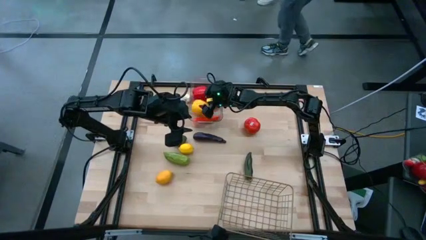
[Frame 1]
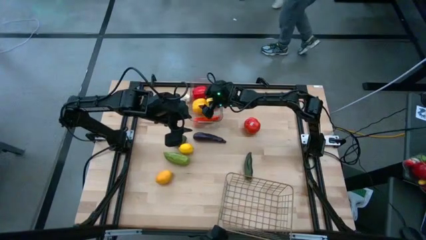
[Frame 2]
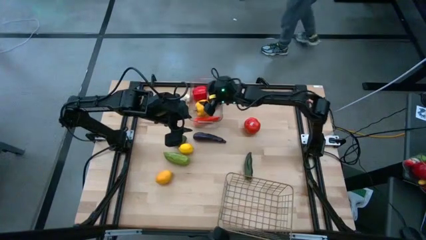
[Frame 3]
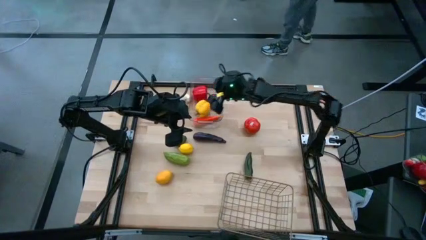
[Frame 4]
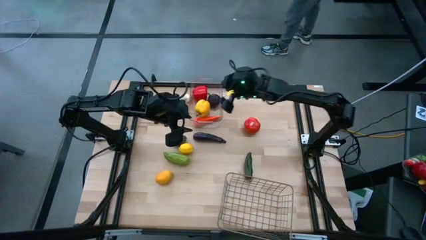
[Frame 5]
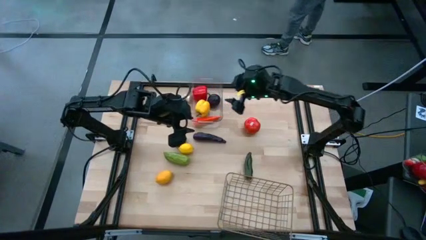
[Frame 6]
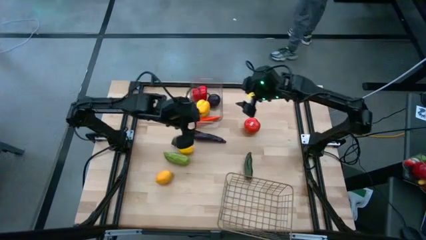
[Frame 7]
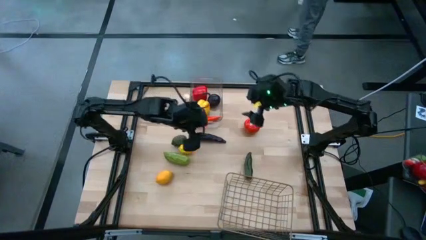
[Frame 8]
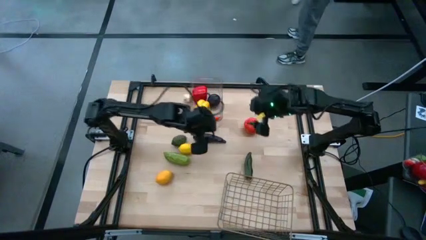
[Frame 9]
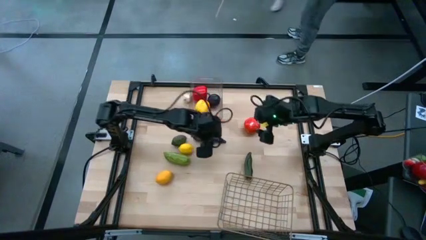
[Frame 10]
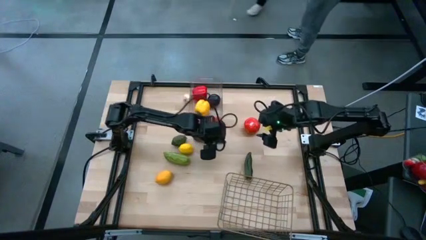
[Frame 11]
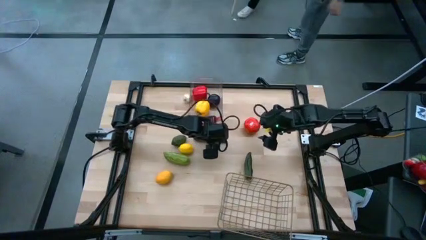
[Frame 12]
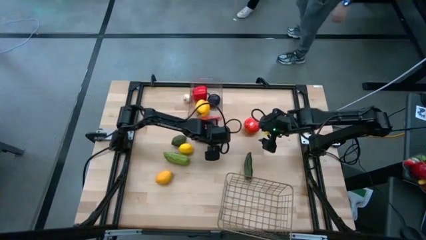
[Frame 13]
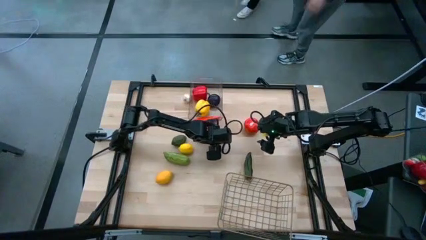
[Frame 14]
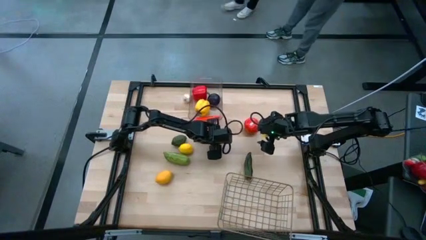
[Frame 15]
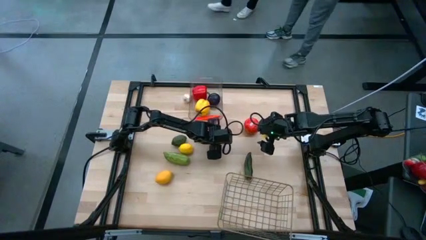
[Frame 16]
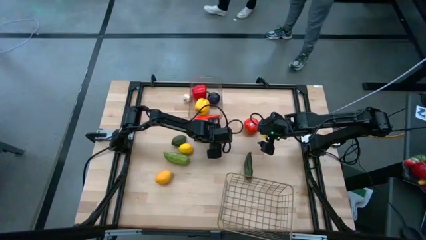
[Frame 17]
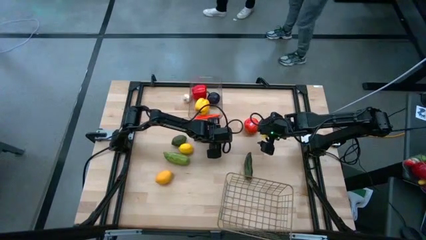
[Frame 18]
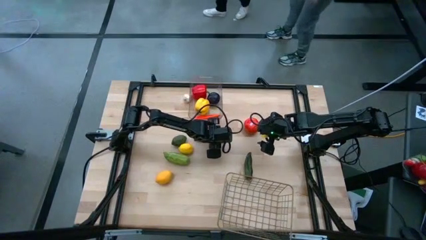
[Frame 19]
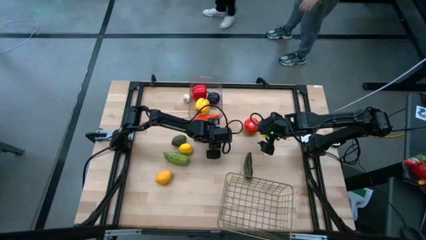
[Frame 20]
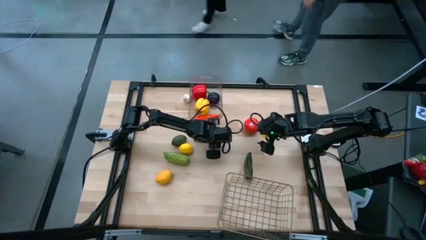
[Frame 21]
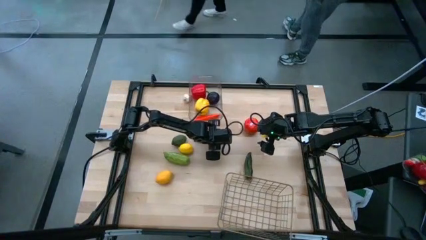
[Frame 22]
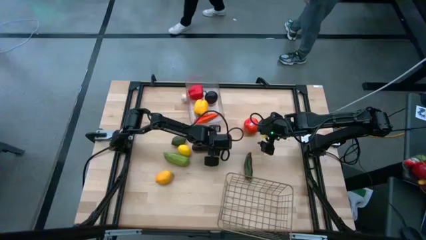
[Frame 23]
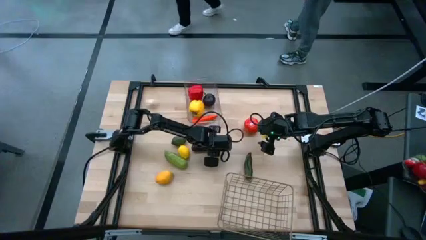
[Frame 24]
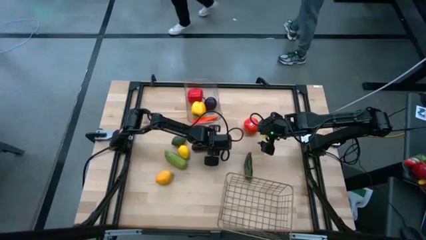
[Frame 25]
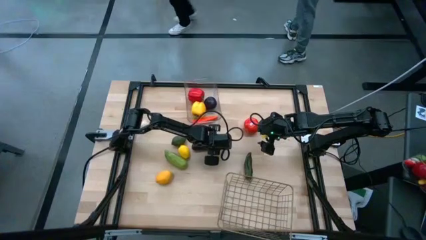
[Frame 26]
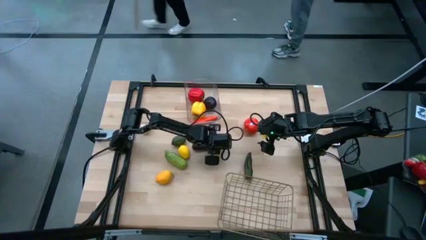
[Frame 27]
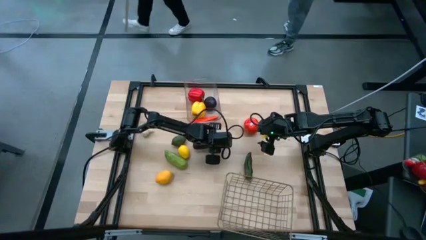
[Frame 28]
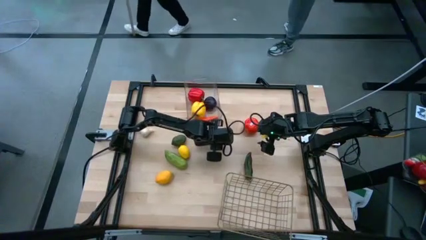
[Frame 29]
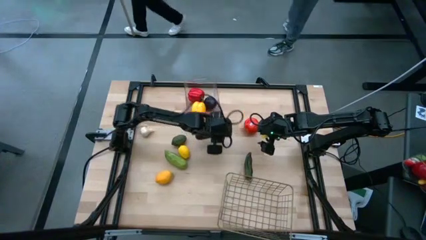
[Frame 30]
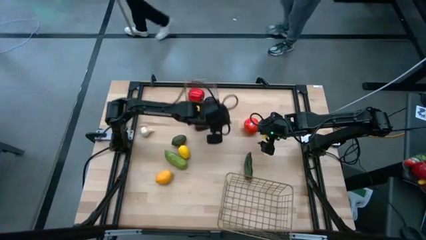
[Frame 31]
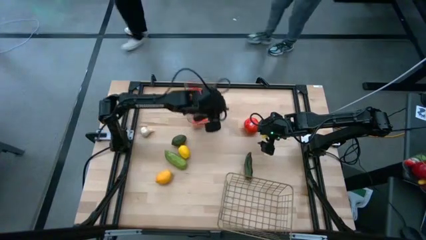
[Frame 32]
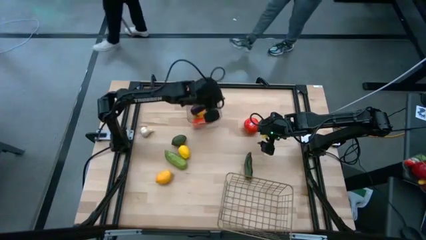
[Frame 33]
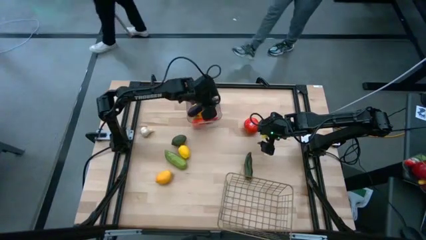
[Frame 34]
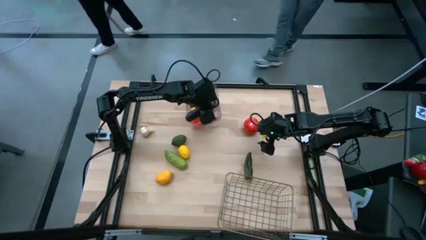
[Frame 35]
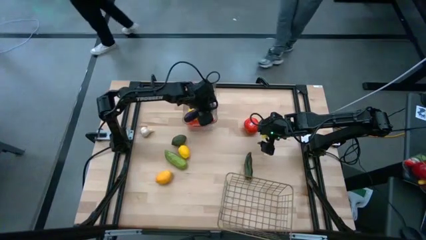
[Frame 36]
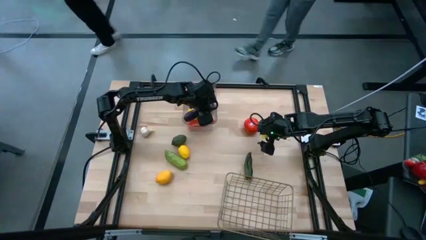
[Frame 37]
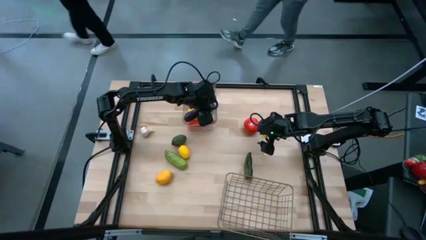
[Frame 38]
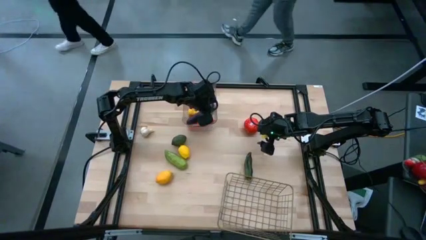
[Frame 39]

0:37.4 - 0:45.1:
Task: Sort produce into baskets
Put the purple eggplant into the transparent bin

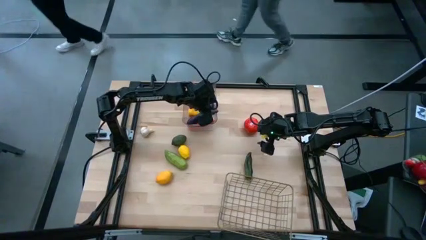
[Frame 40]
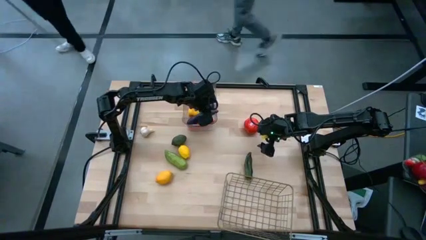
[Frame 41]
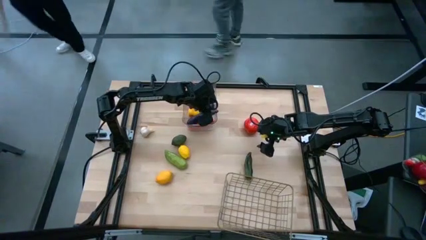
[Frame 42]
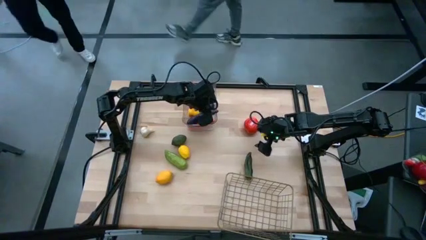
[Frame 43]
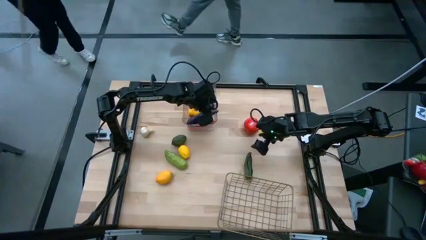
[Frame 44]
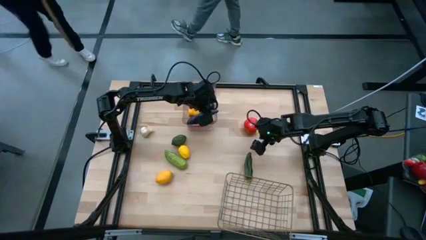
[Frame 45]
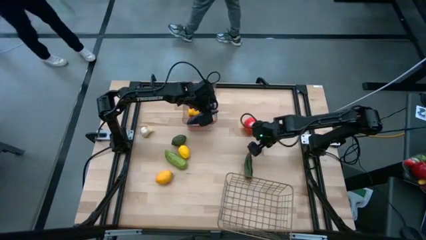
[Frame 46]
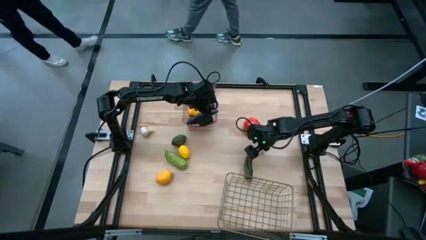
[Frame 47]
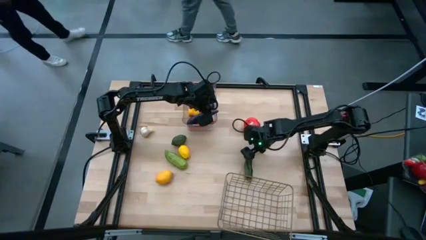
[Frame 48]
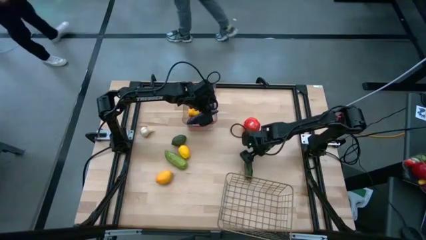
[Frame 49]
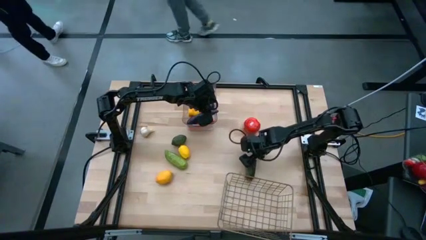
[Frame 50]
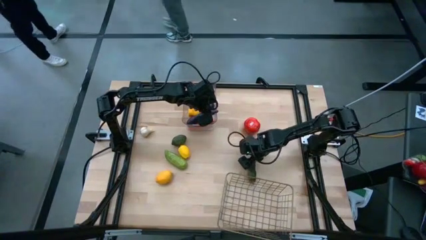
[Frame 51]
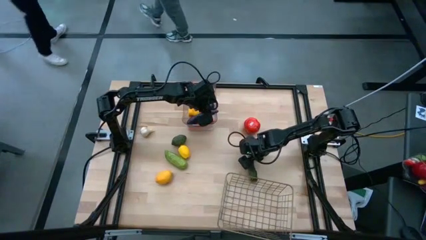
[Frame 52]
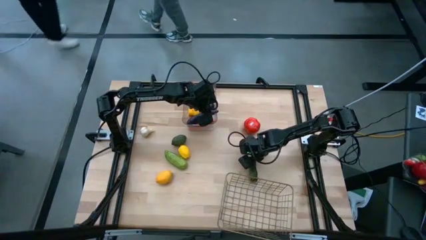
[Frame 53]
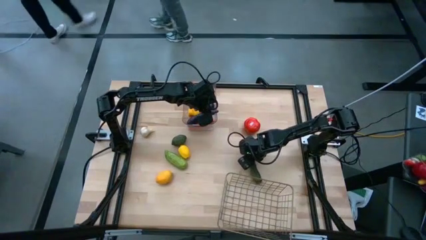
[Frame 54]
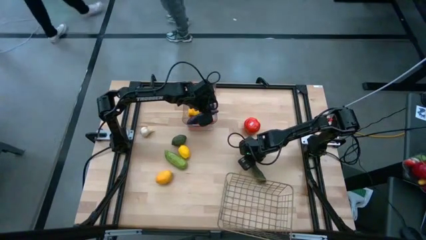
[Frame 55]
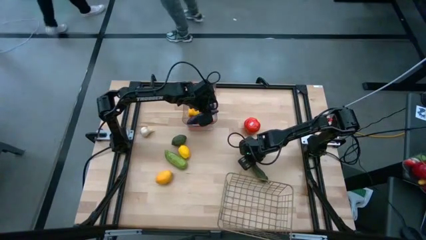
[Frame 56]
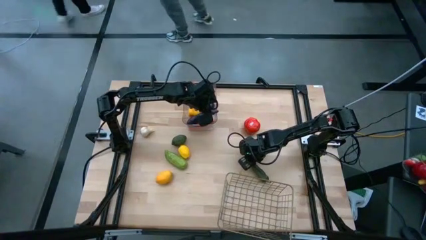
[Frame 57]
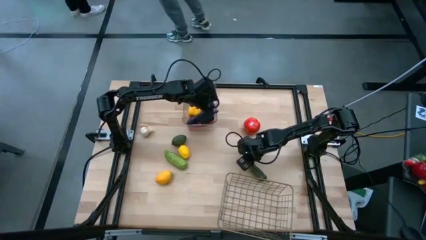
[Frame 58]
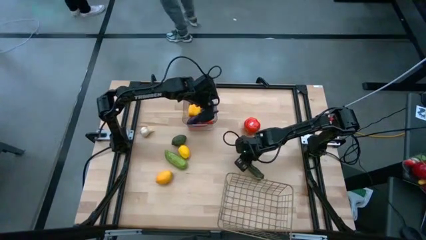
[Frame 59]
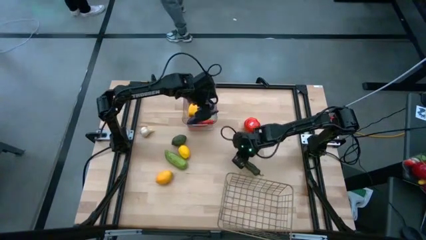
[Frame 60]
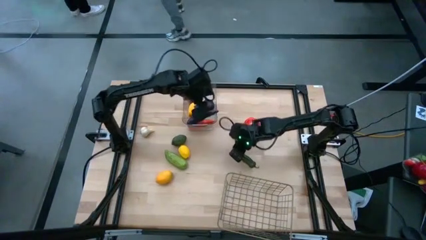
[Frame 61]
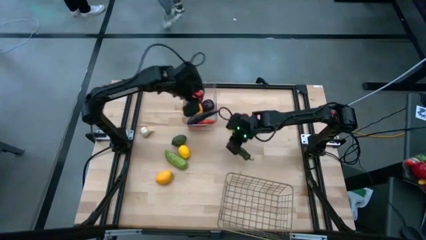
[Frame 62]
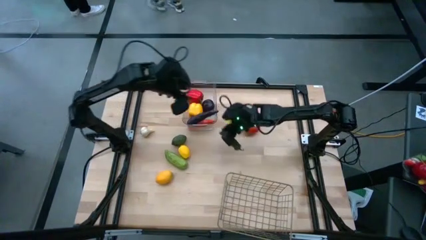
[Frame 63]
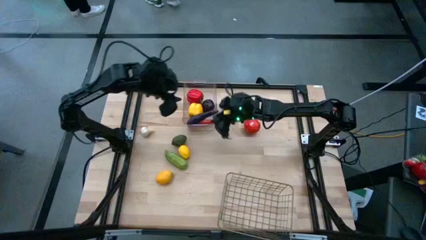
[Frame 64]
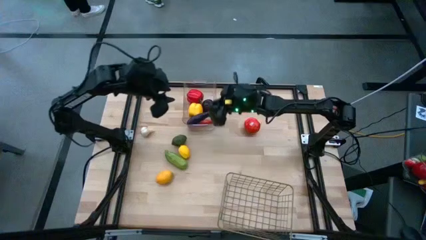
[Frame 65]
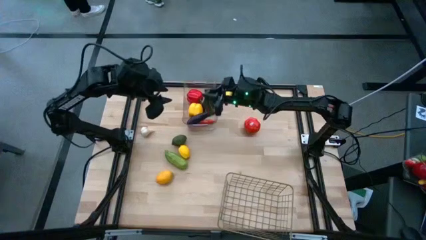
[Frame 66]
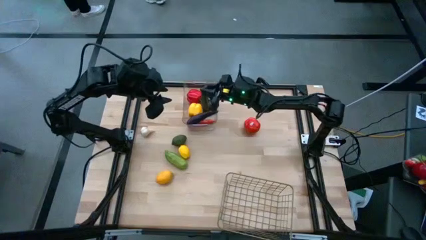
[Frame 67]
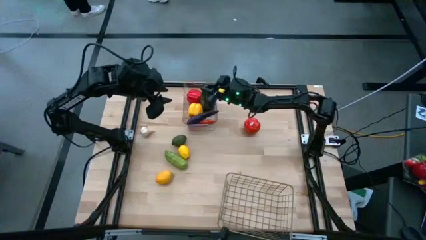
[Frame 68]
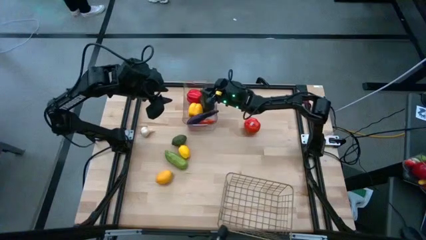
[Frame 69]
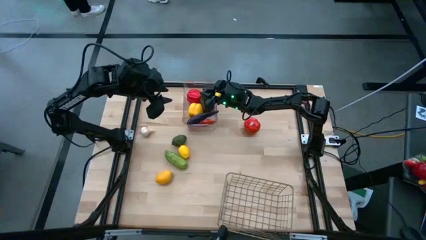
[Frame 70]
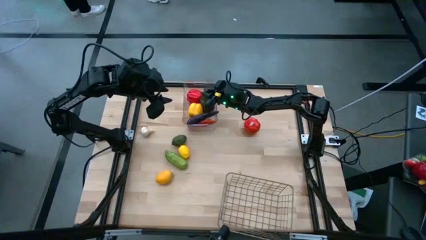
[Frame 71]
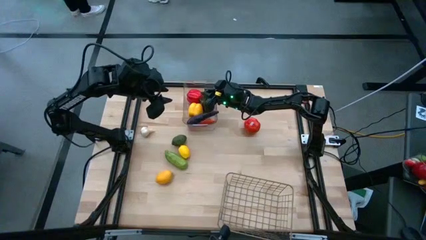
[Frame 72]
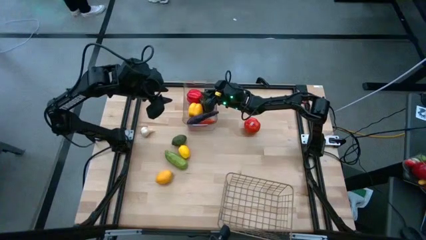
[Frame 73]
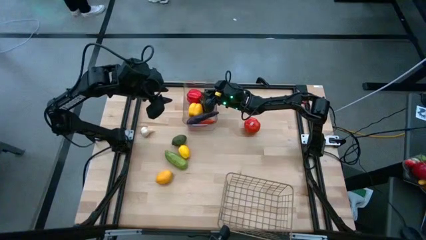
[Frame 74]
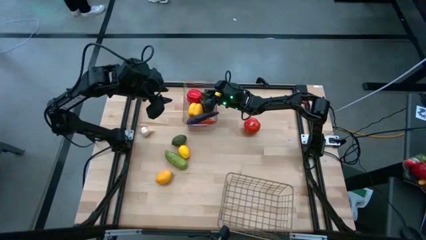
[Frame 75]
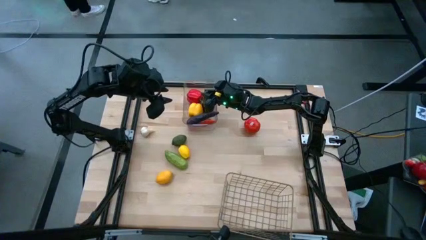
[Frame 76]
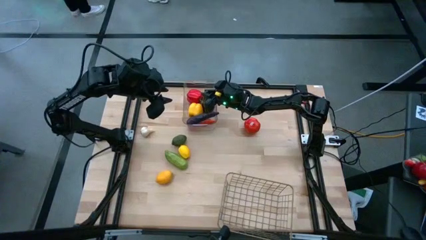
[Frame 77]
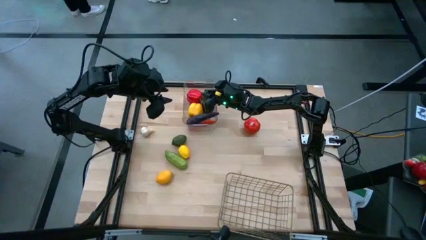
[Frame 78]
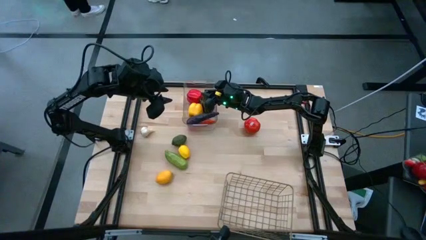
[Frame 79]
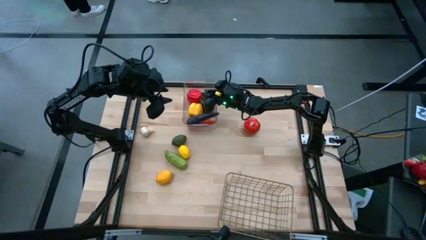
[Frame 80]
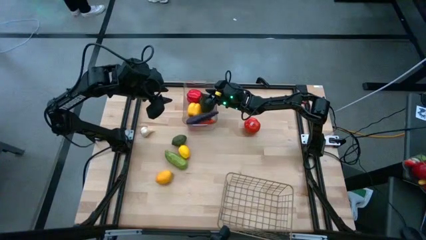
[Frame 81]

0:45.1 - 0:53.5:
Put the green chili pepper into the transparent bin
